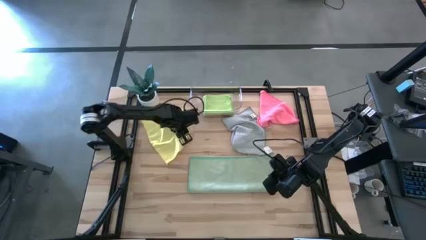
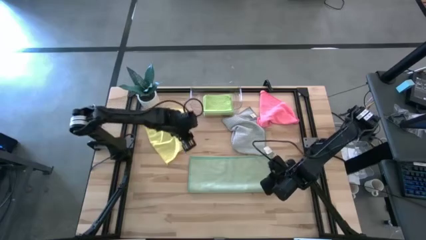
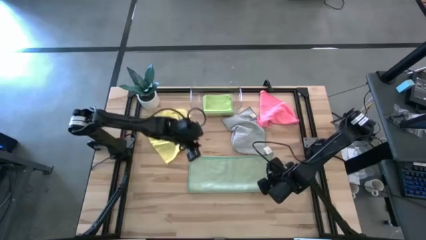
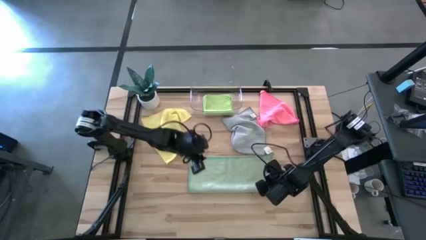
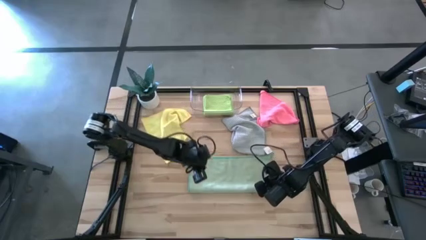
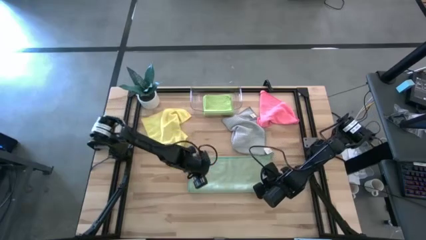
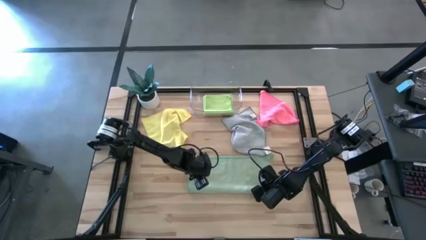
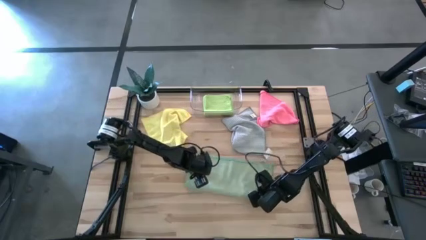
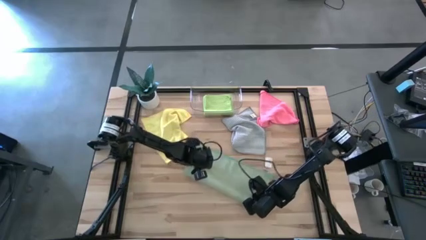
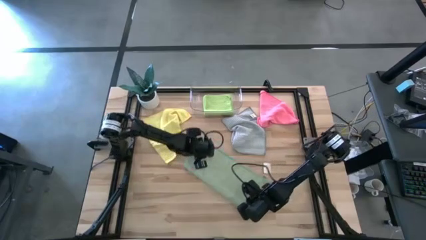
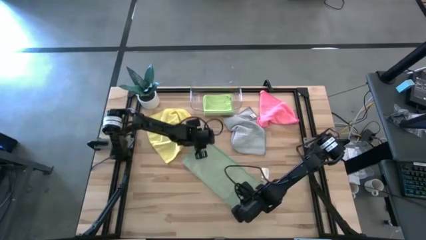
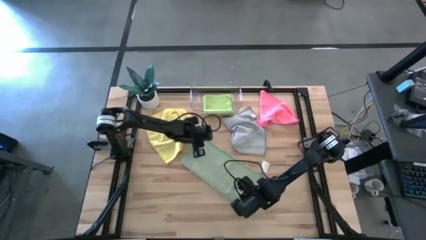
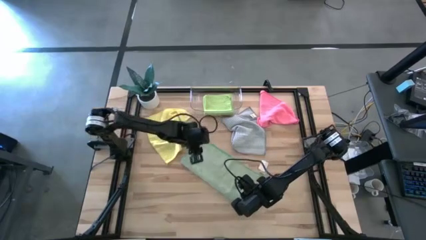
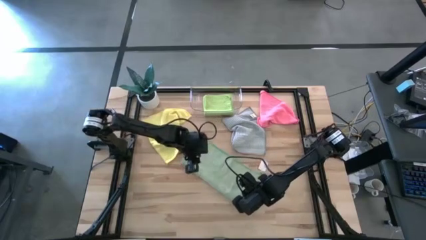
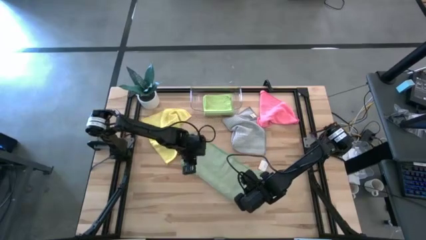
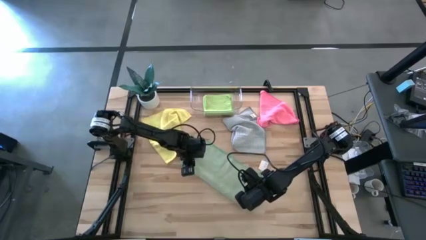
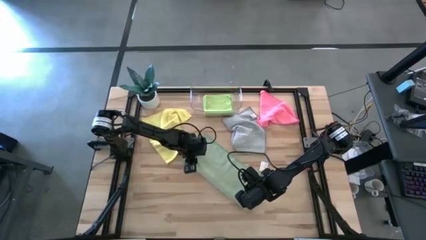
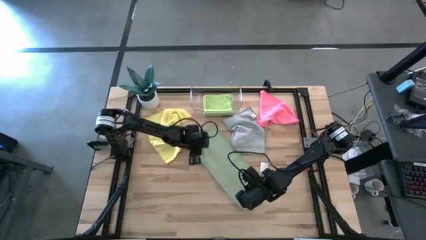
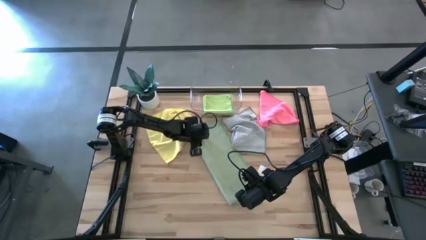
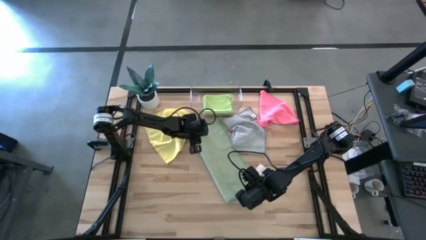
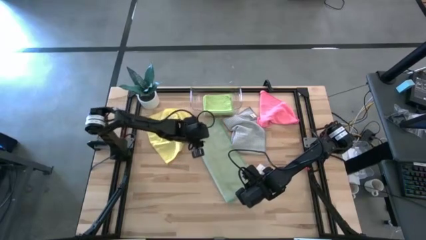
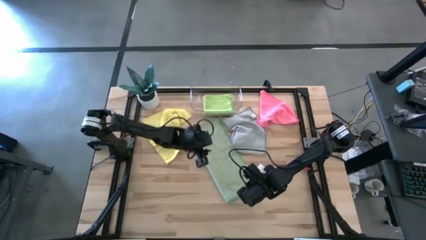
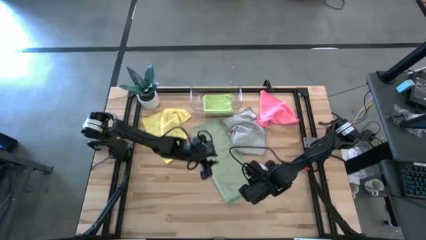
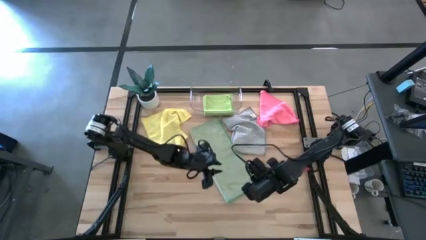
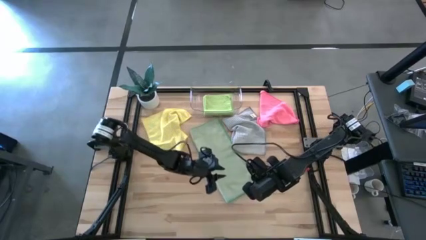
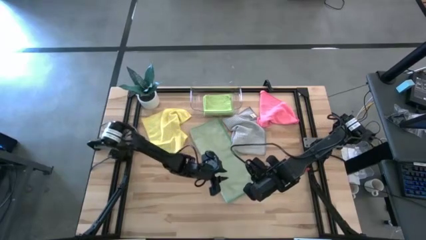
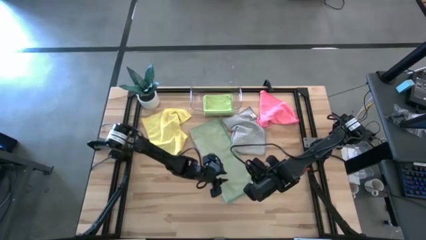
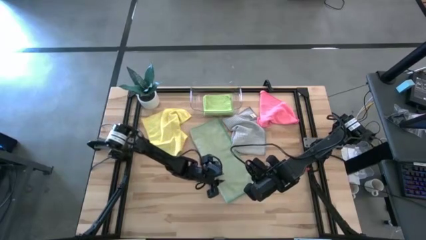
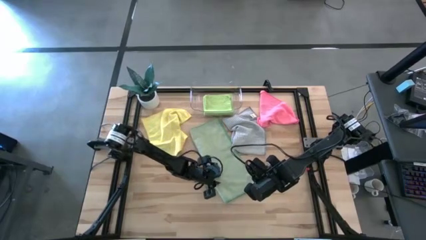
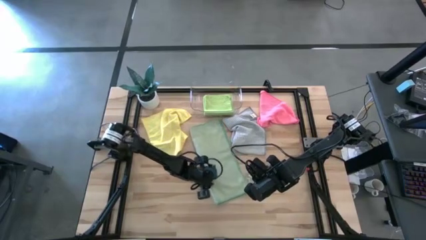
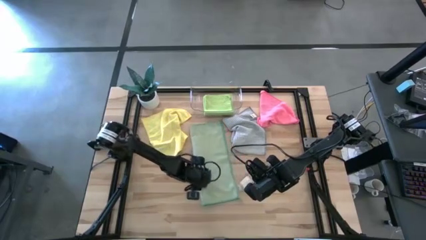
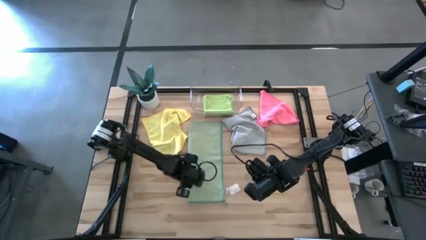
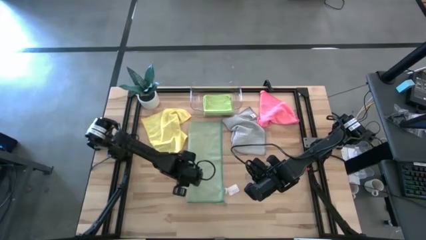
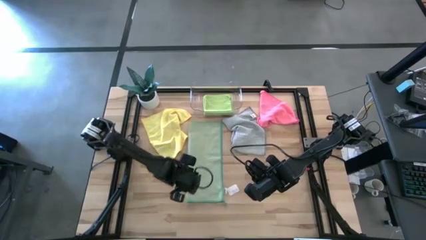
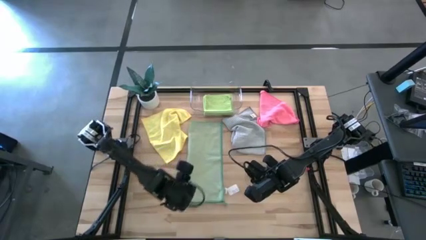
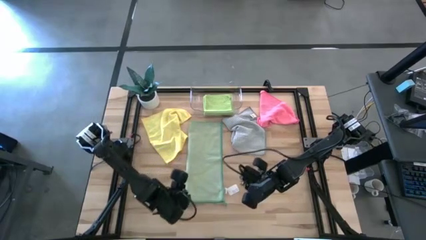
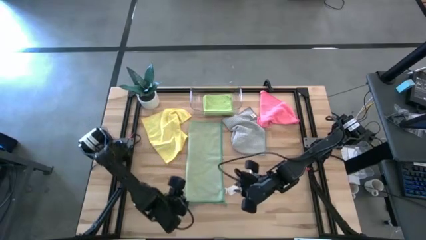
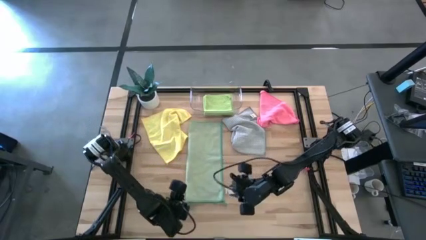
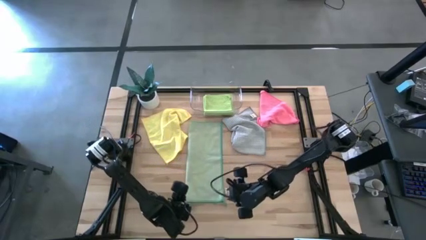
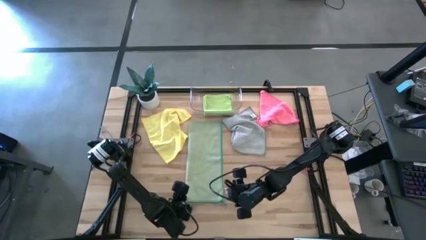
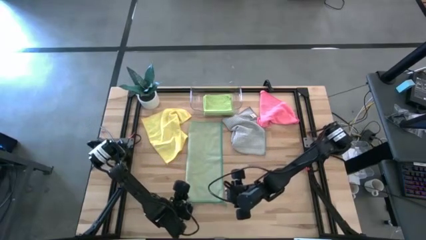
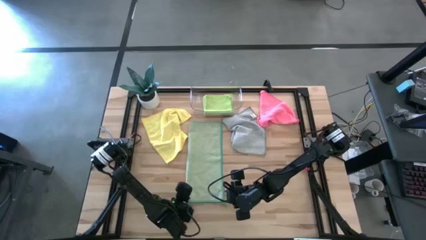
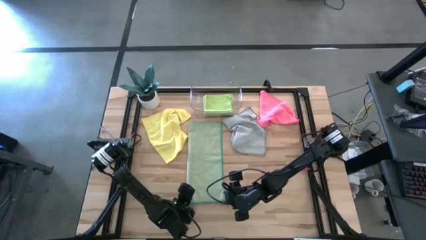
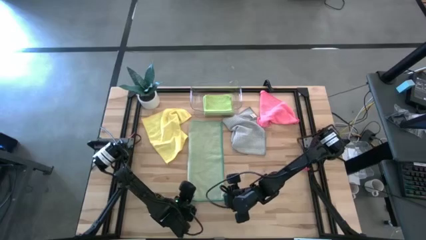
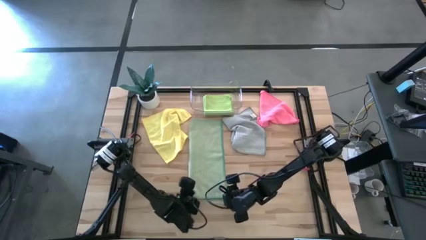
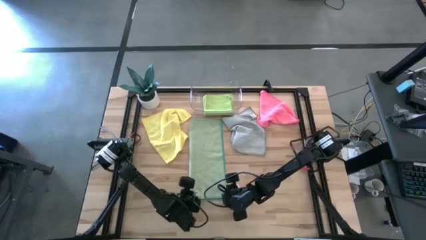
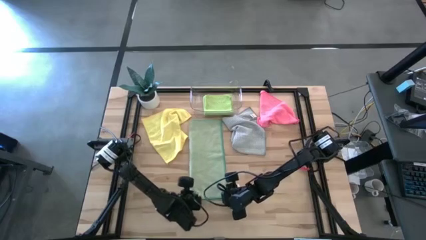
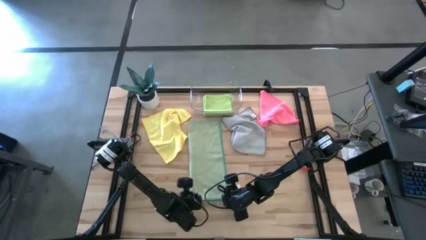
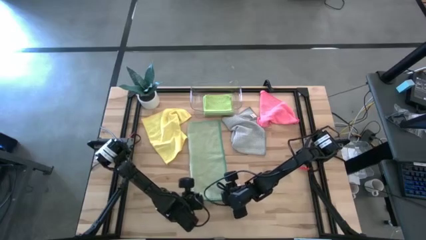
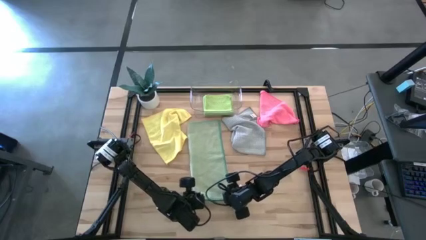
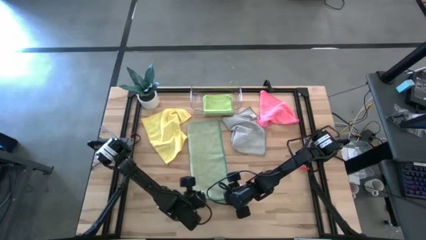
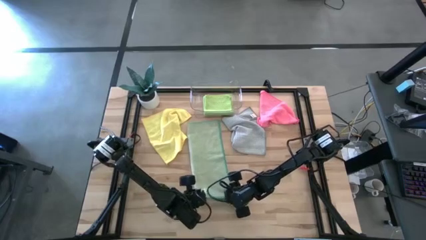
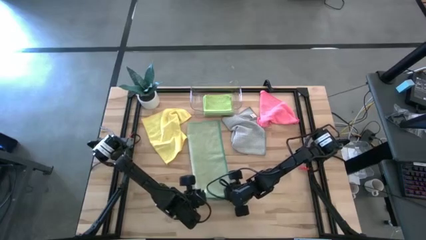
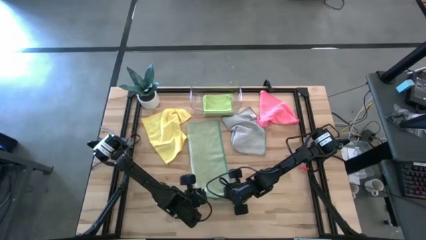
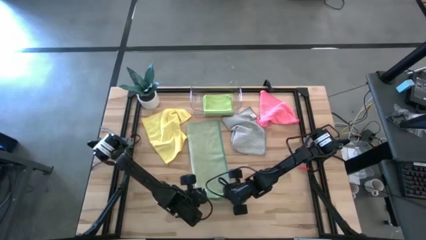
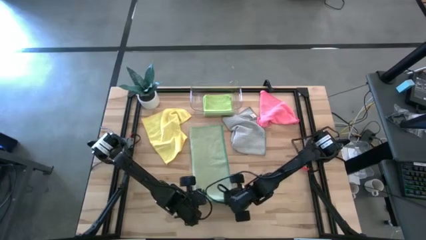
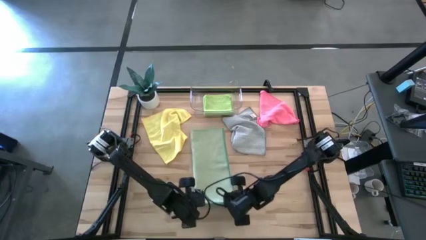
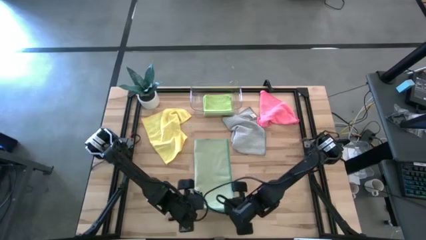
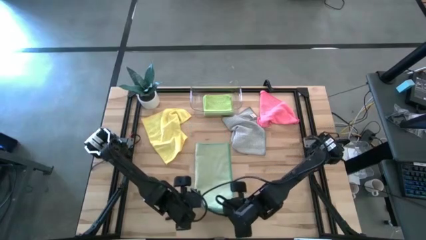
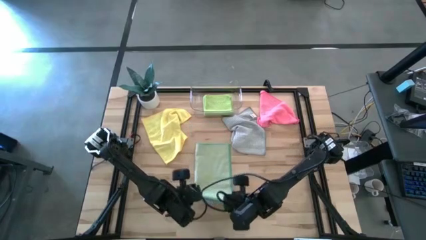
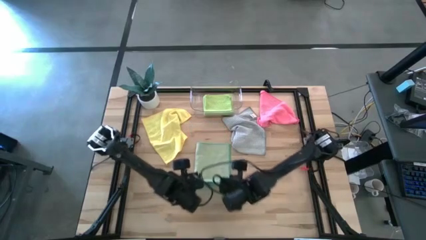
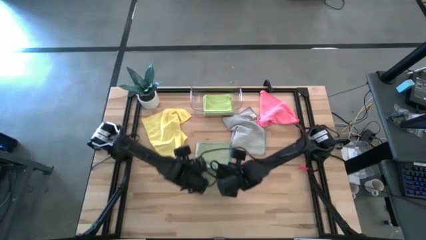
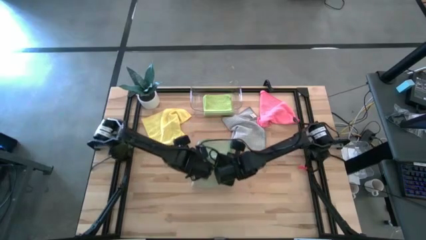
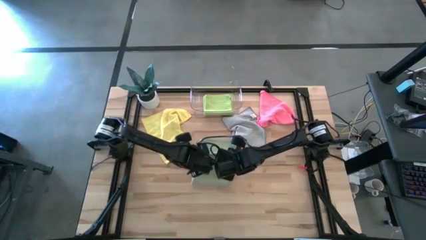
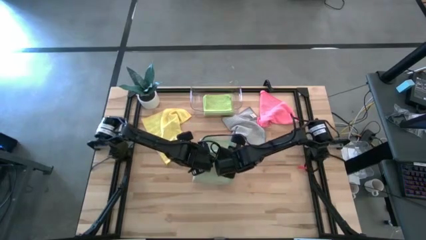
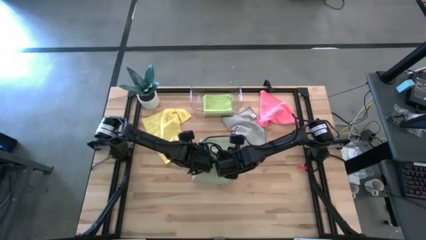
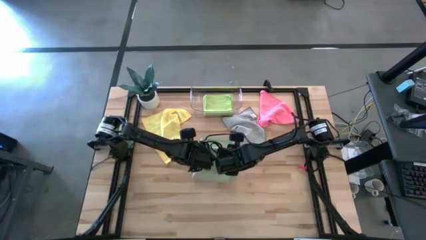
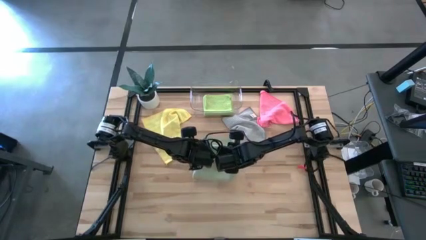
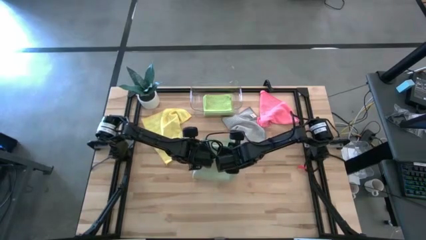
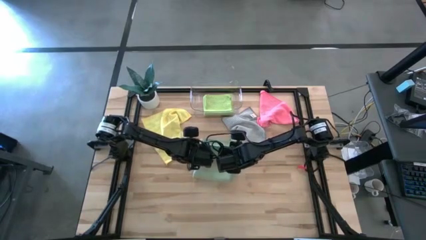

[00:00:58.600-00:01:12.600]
Task: Fold microfiber towels
Fold the light green microfiber cloth

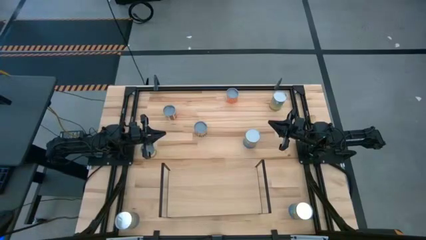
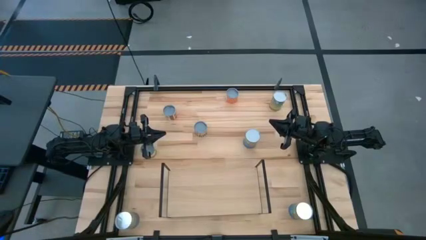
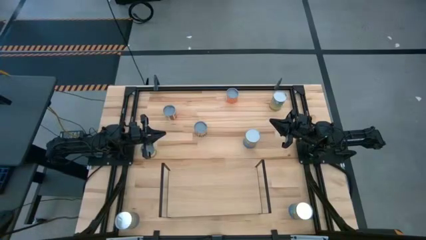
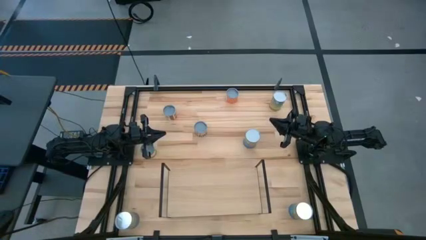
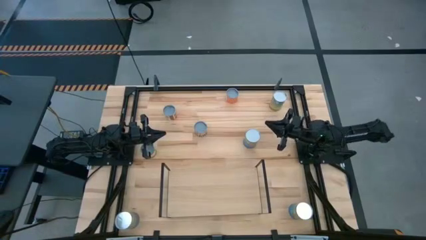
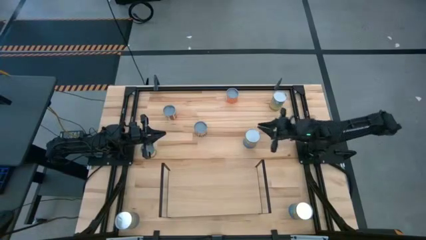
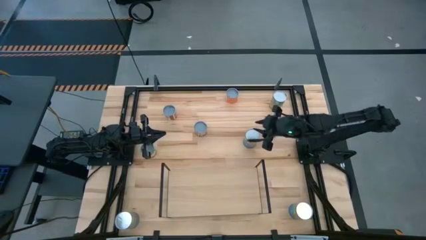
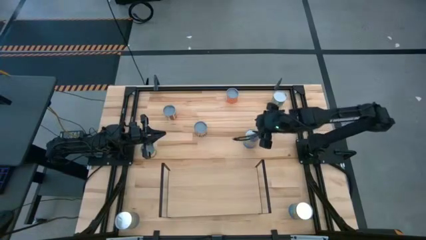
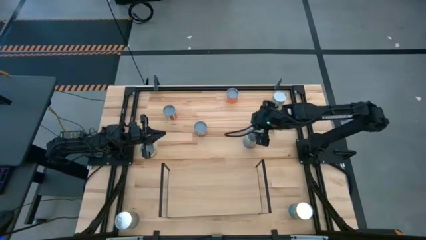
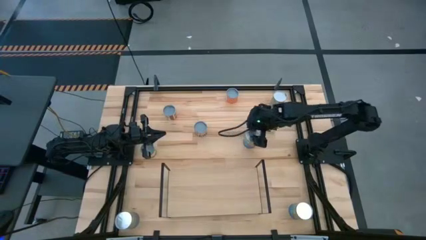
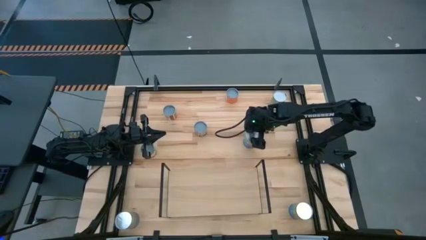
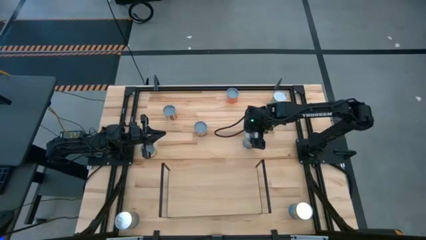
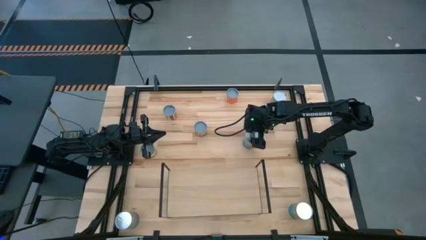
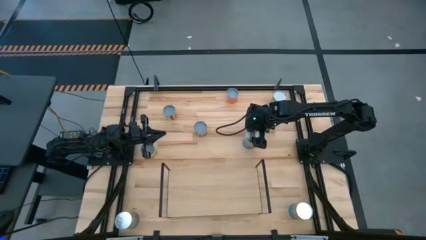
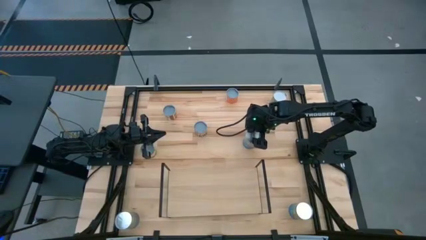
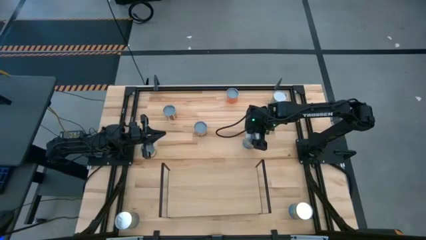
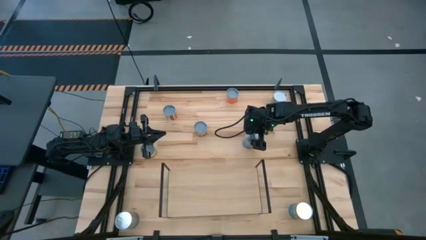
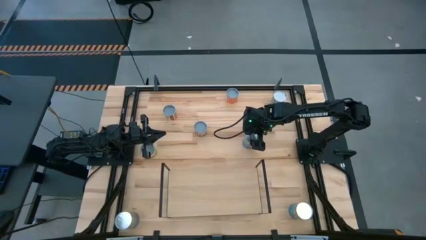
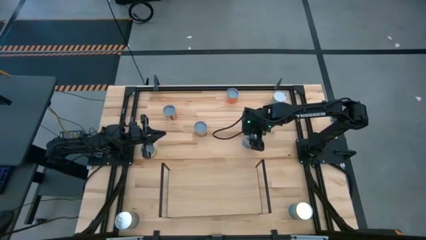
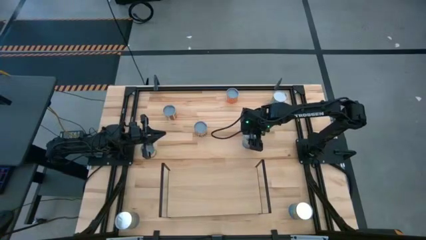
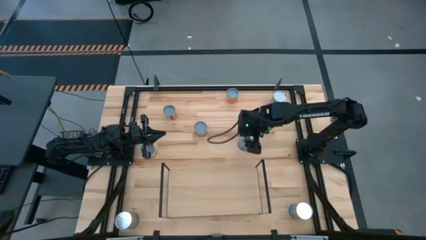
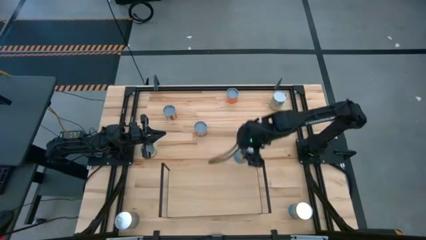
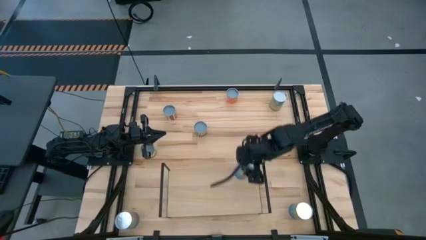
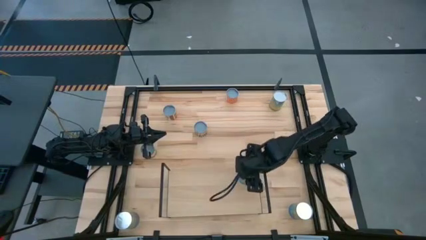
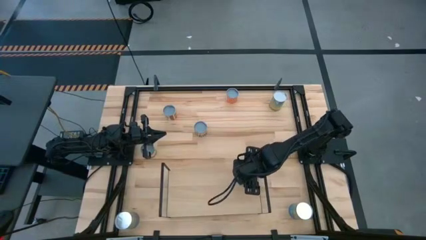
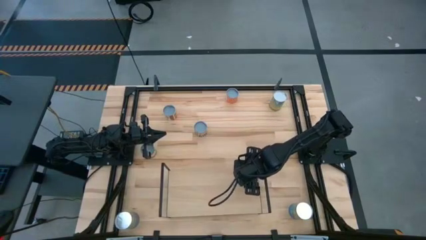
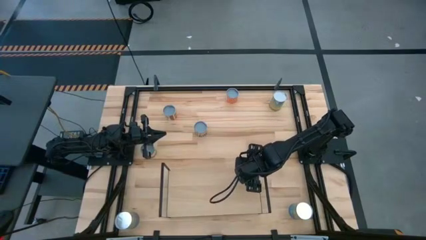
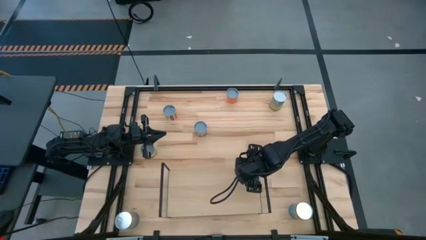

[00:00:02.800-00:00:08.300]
Task: Pick and place cans onto a shelf
Put the top canned tomatoes on the shelf
